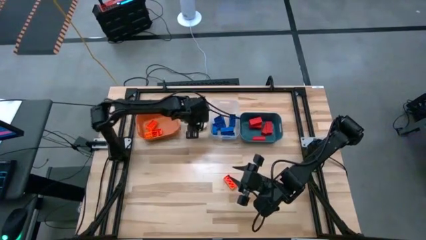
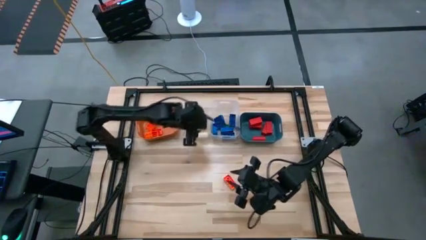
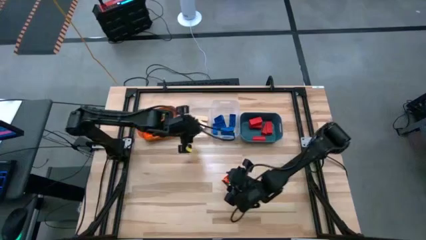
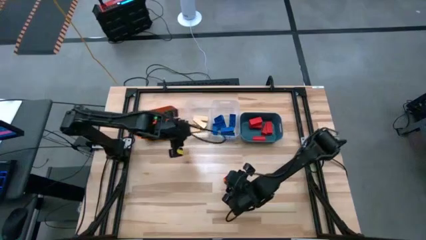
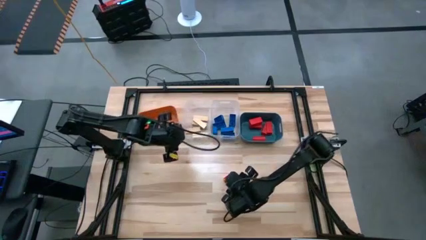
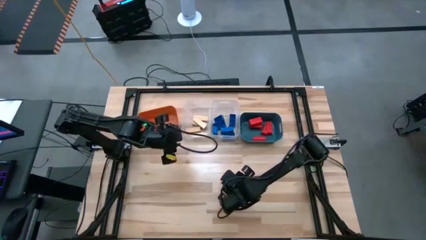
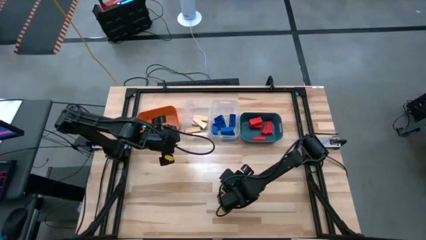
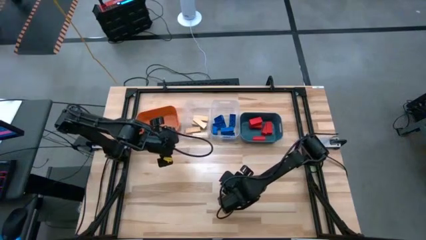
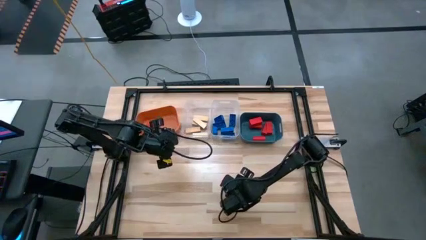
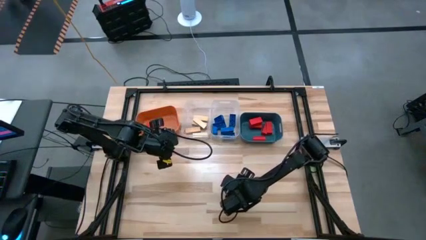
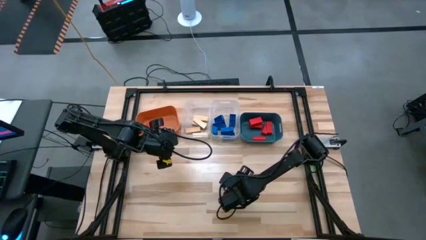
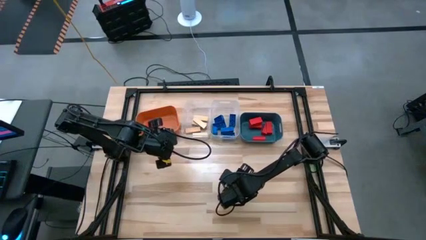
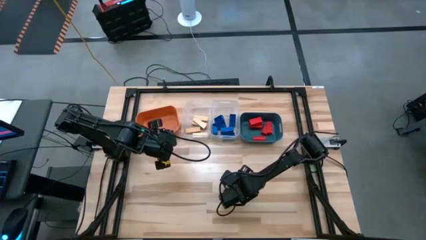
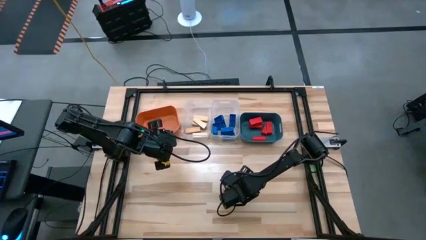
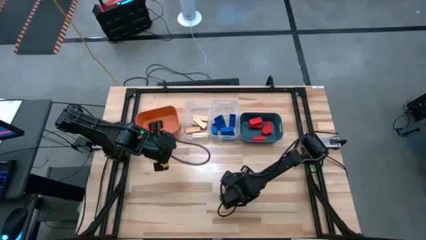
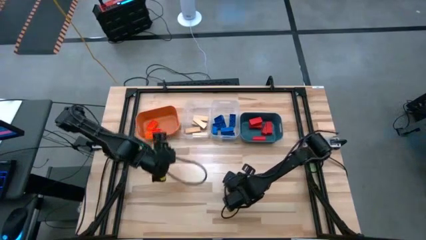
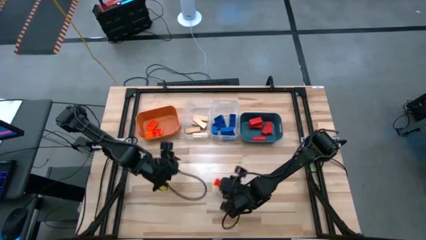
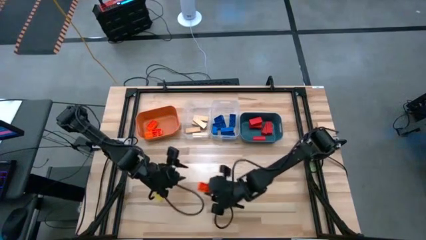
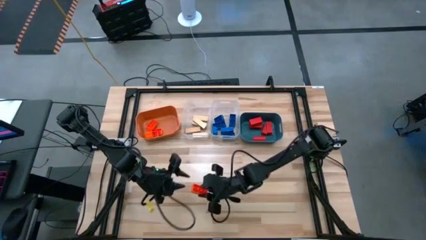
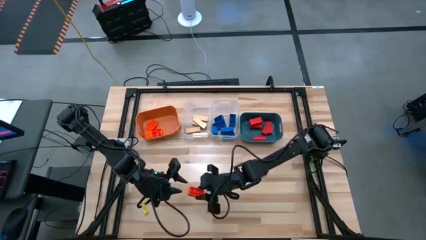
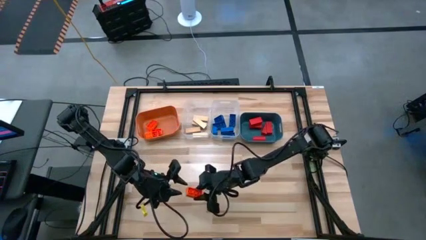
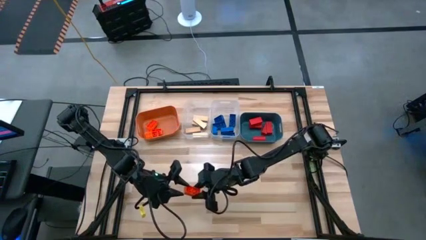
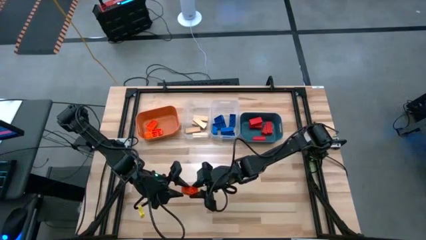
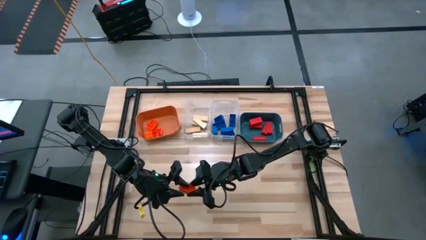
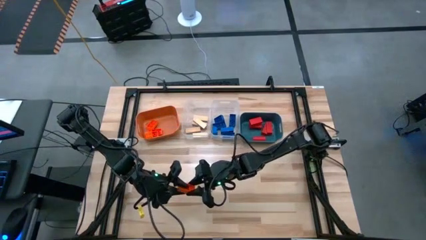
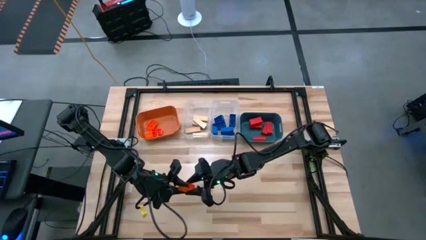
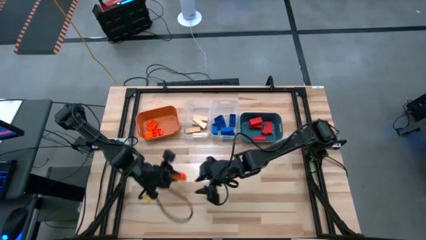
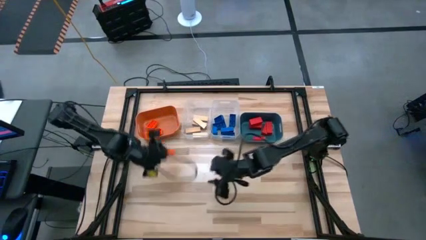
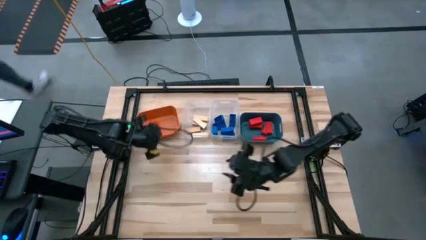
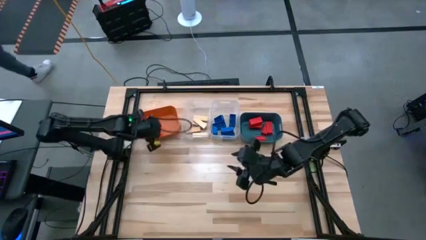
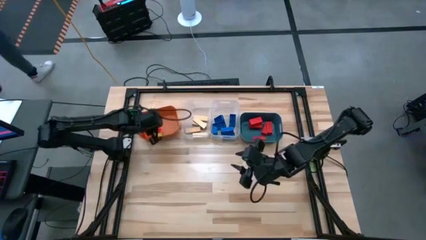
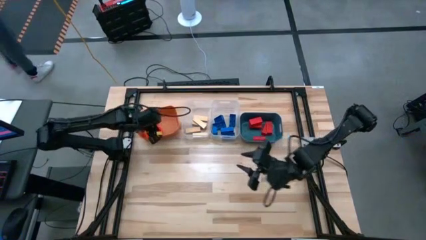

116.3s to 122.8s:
Task: Sort blocks
Put the orange game piece into the orange bin

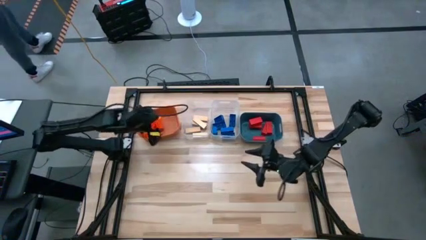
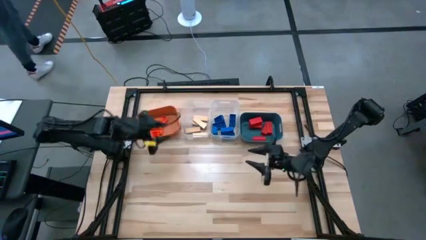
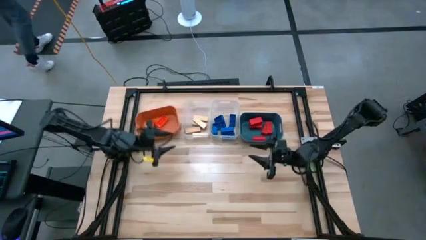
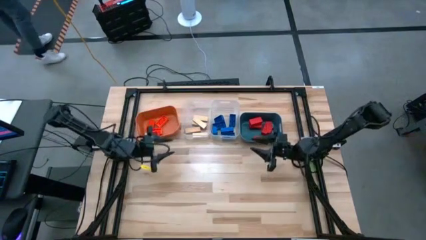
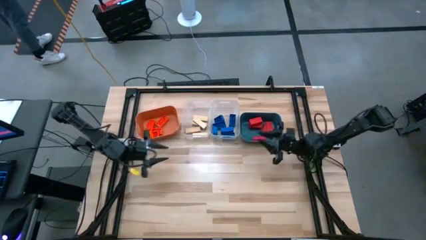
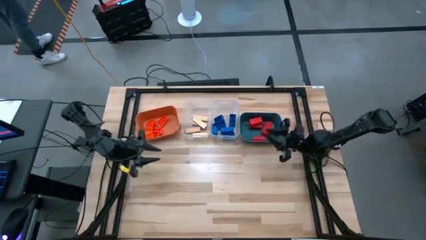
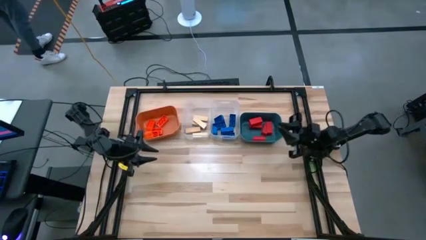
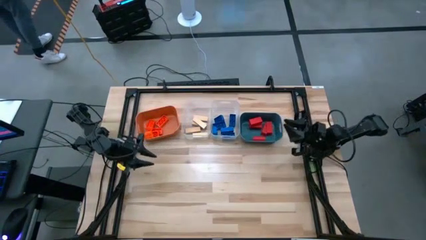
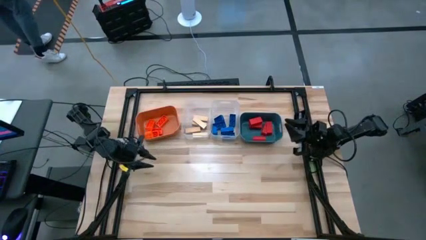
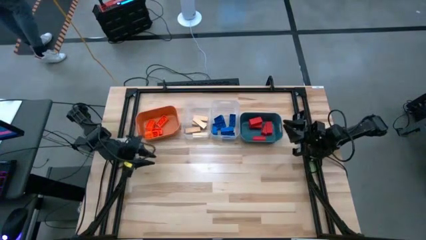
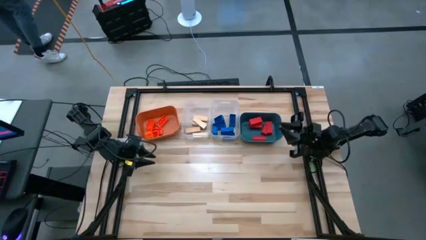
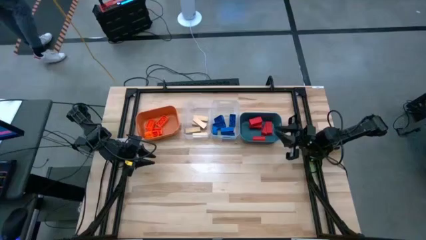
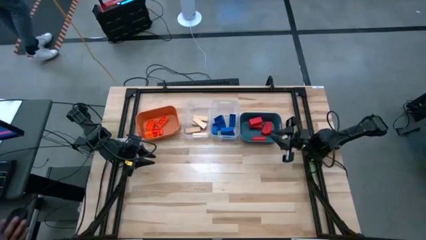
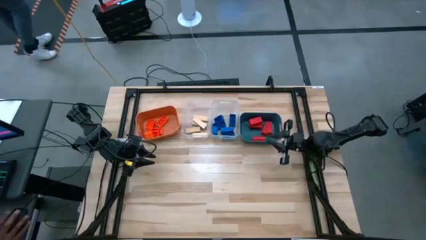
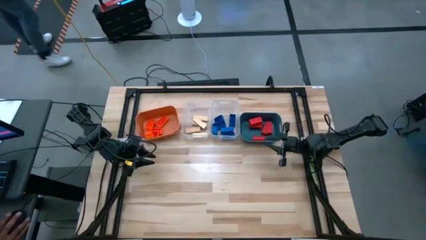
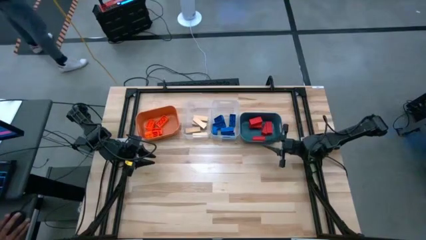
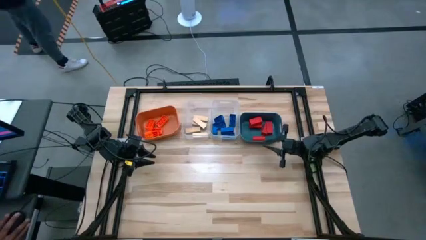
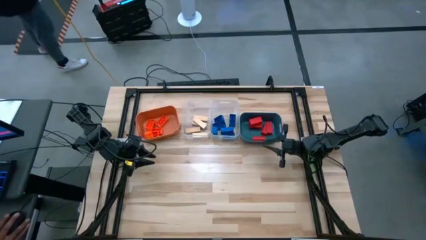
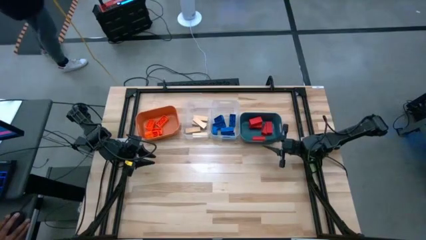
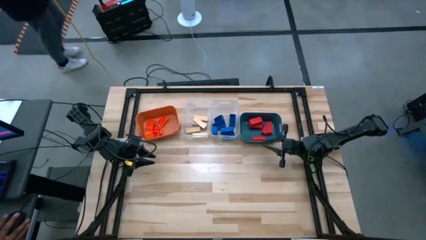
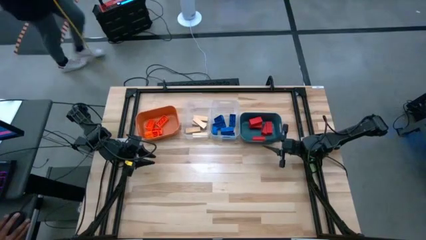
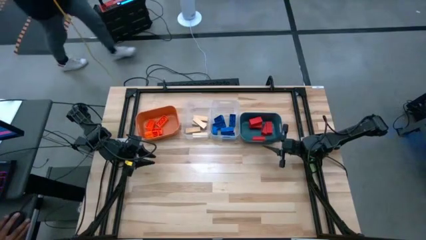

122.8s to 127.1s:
Return to Home Position

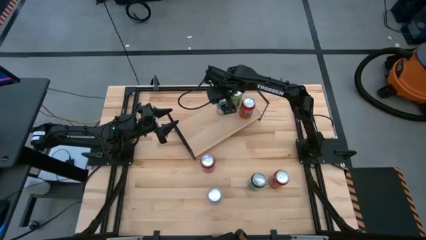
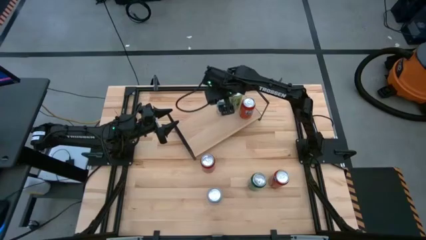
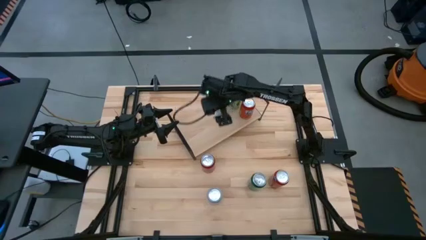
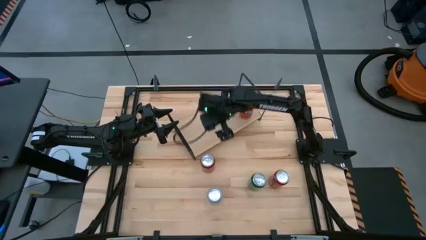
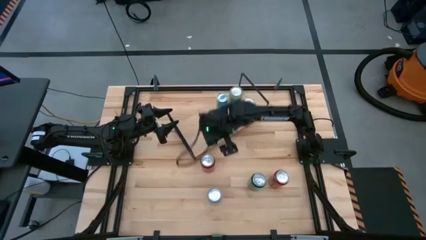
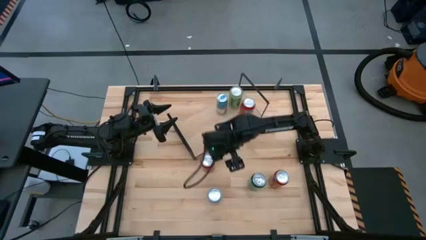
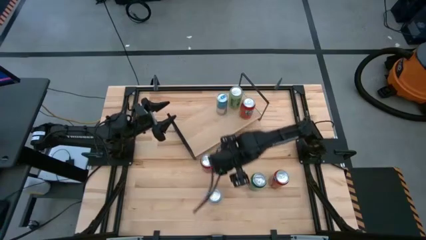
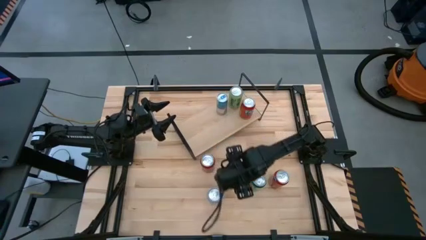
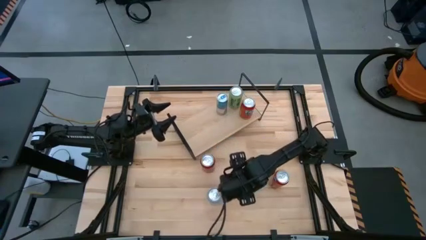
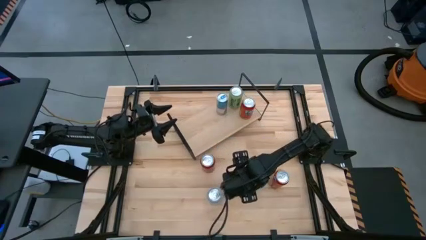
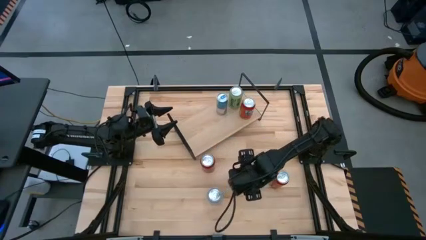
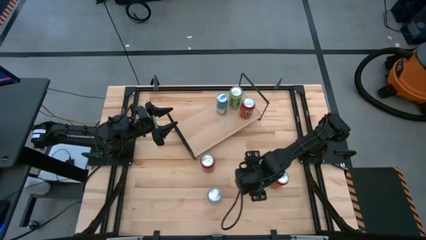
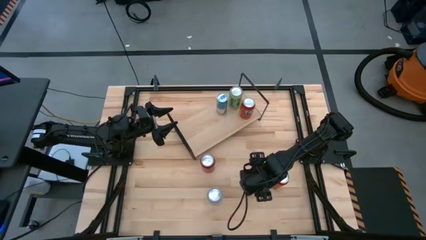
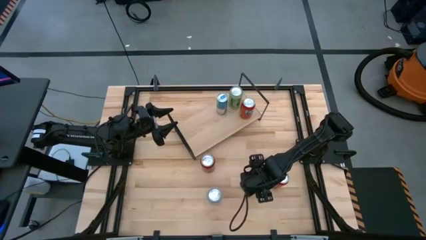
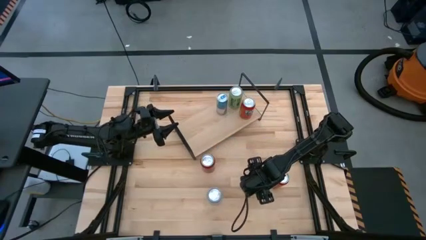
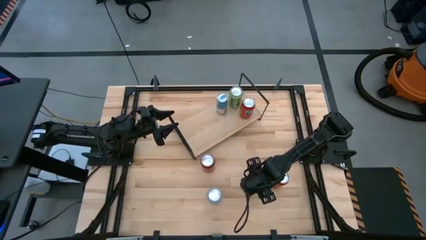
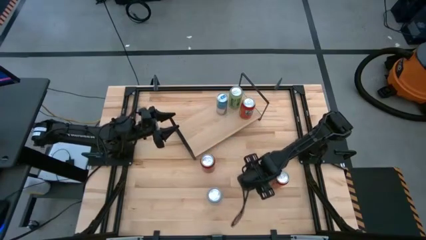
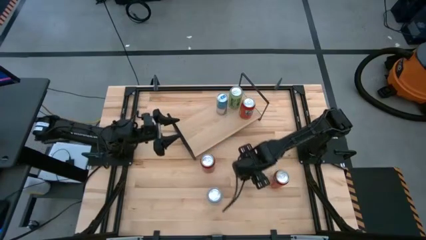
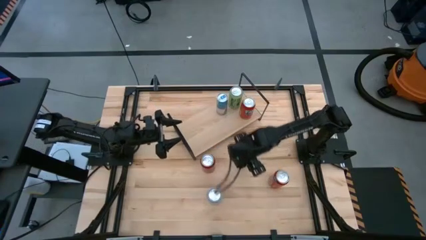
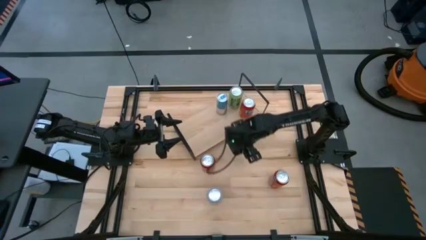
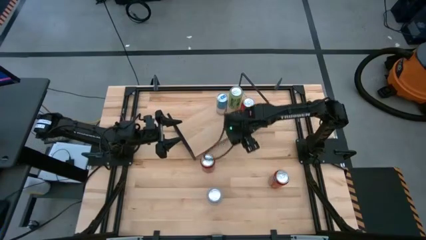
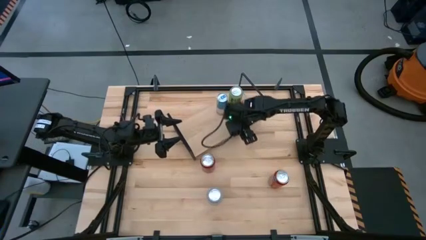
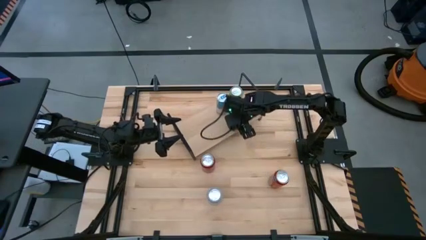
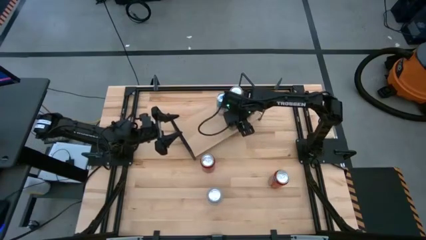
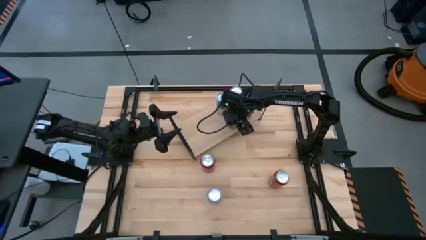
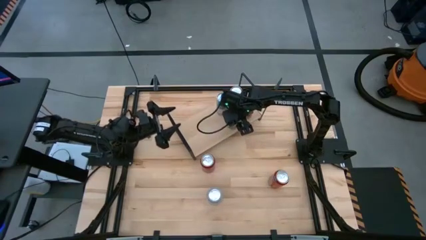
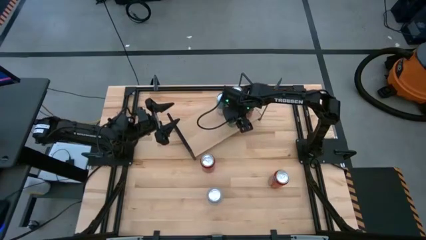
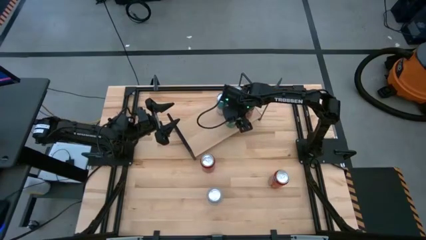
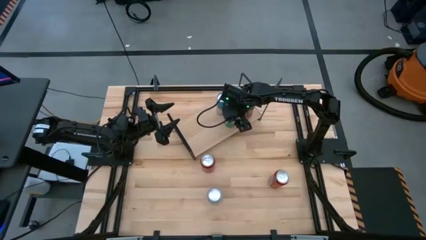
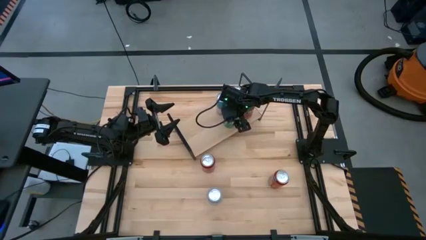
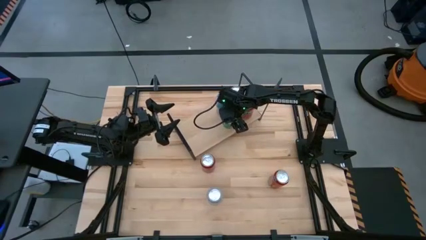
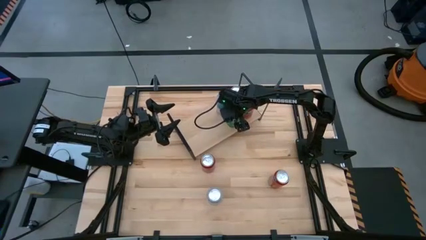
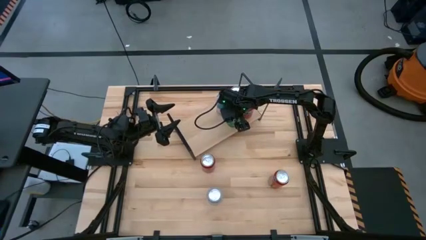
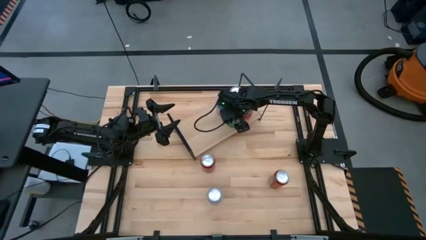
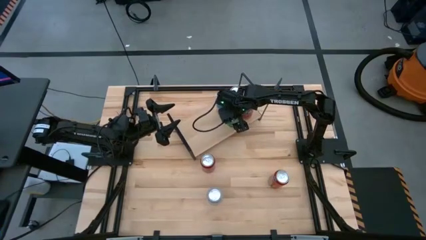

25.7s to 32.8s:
Task: Place canned beverage on shelf
Put the dark green soda can on the shelf aligned with the blue soda can
